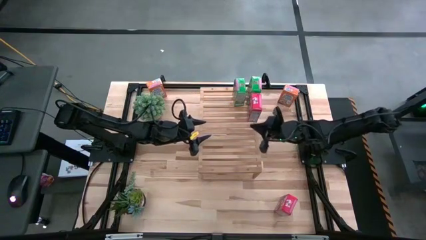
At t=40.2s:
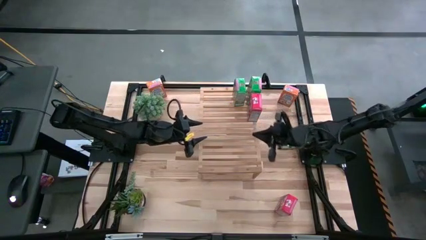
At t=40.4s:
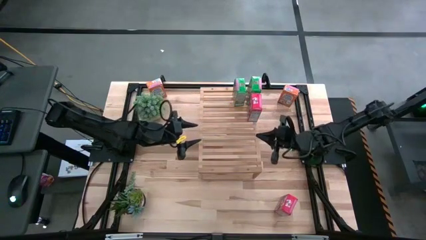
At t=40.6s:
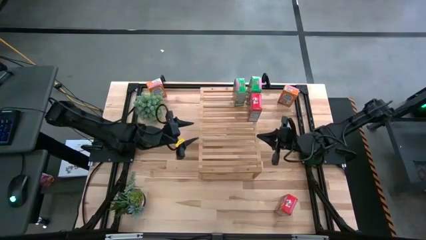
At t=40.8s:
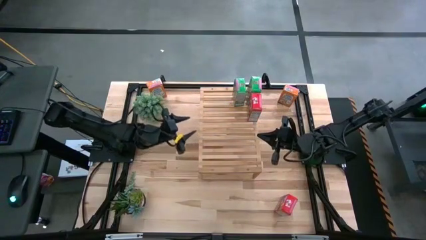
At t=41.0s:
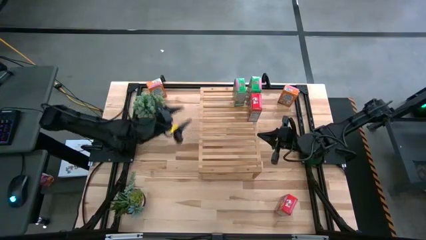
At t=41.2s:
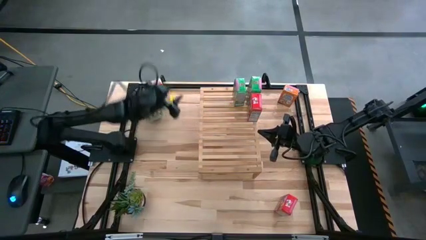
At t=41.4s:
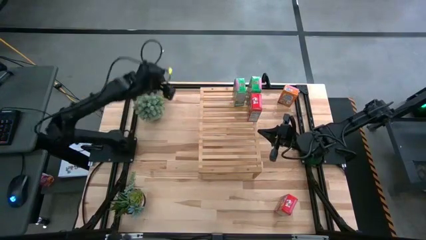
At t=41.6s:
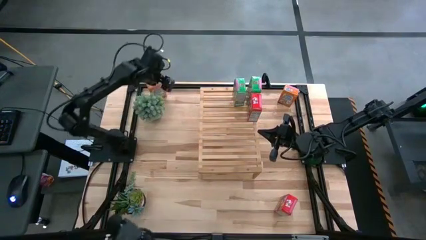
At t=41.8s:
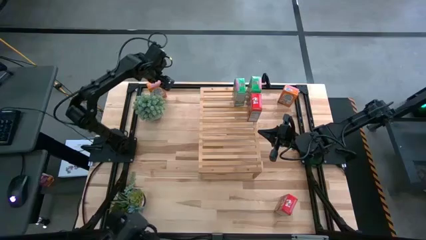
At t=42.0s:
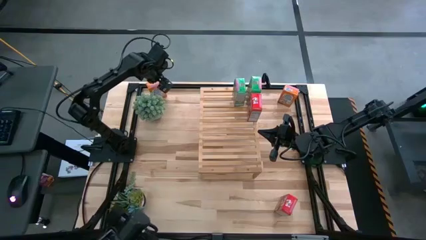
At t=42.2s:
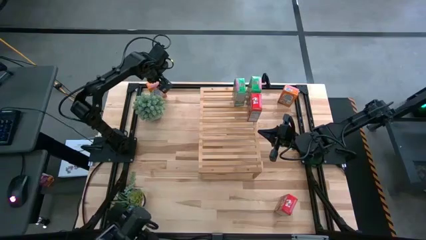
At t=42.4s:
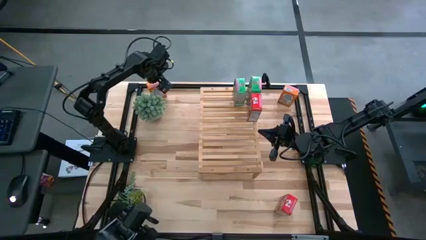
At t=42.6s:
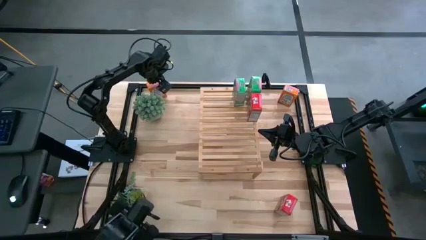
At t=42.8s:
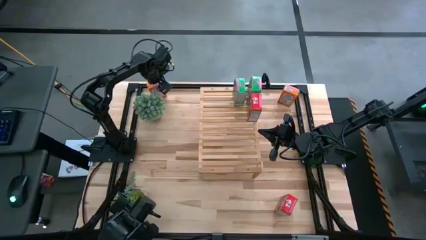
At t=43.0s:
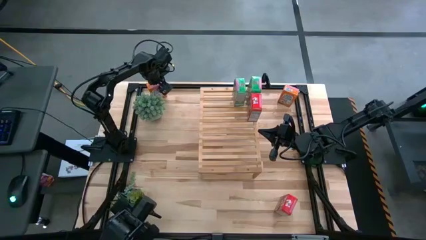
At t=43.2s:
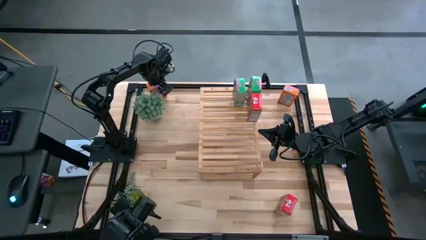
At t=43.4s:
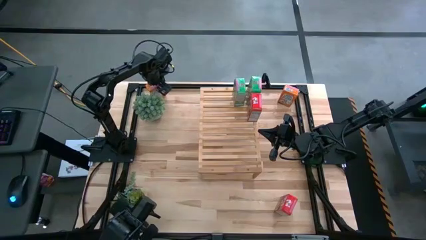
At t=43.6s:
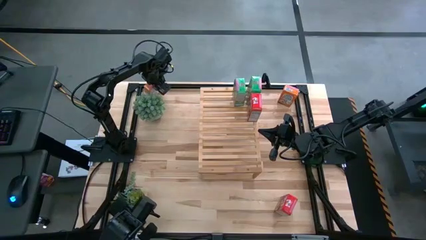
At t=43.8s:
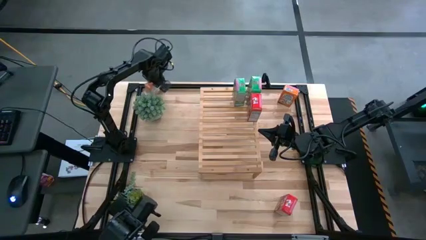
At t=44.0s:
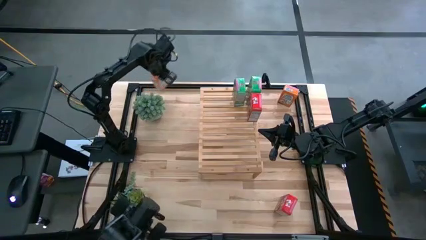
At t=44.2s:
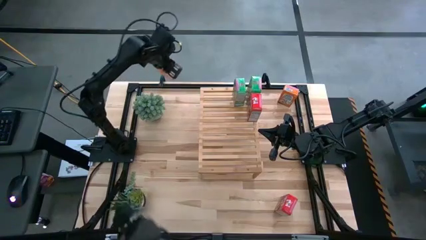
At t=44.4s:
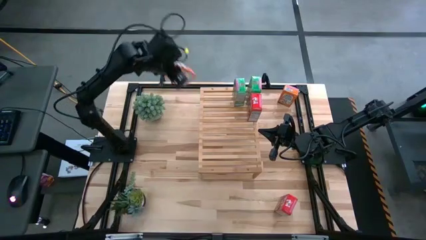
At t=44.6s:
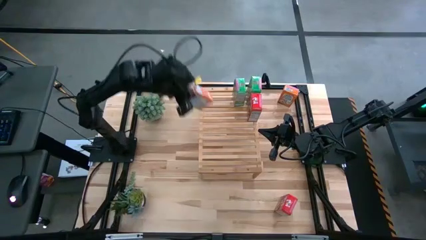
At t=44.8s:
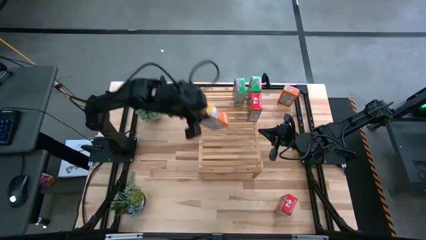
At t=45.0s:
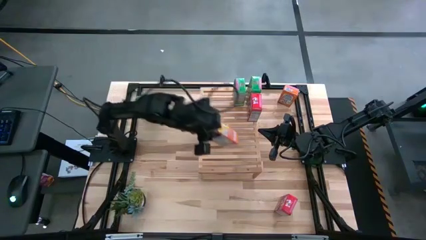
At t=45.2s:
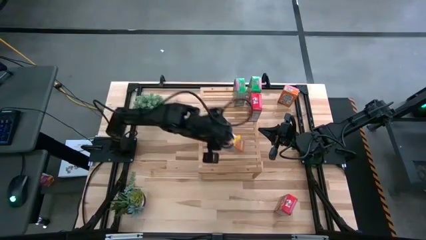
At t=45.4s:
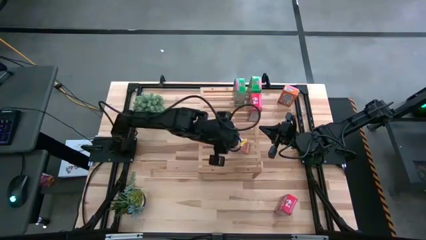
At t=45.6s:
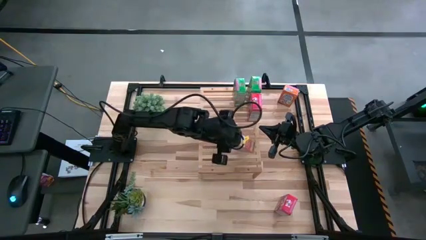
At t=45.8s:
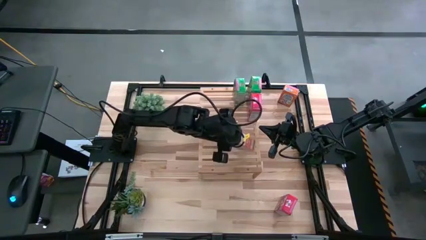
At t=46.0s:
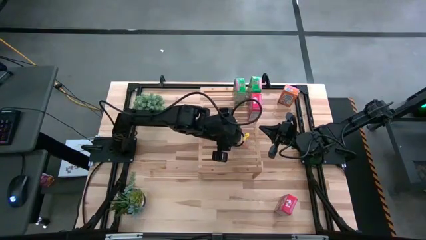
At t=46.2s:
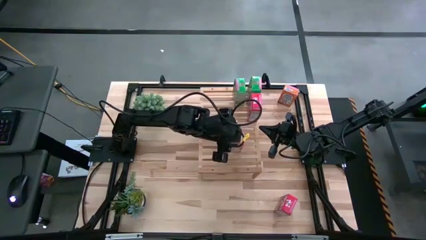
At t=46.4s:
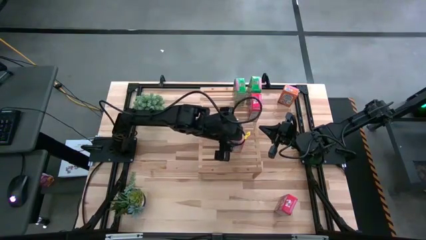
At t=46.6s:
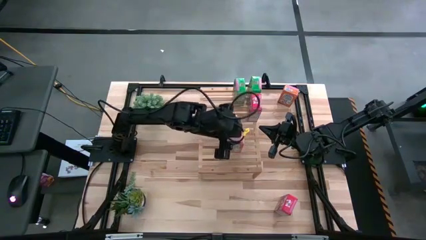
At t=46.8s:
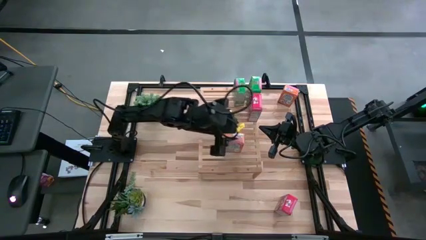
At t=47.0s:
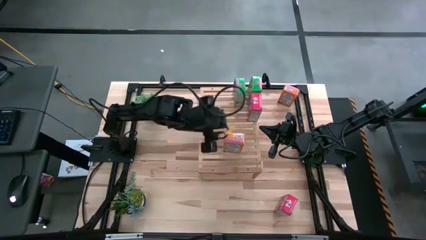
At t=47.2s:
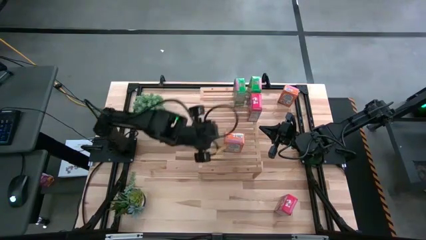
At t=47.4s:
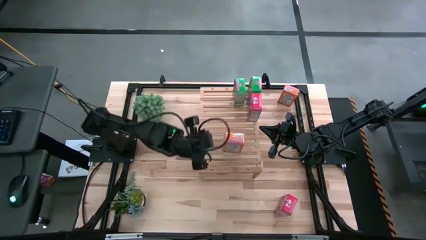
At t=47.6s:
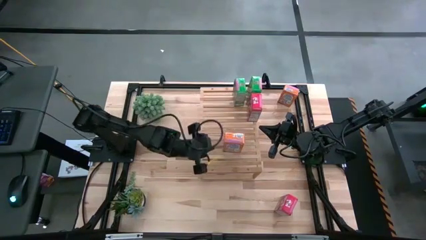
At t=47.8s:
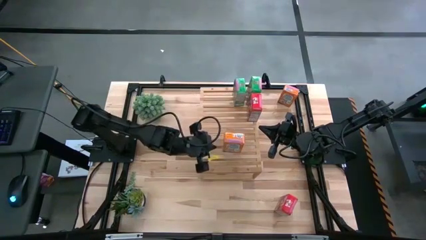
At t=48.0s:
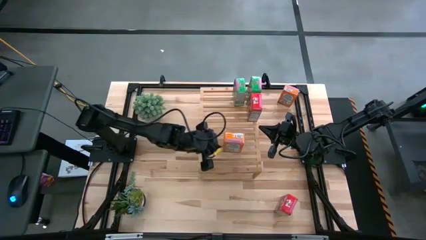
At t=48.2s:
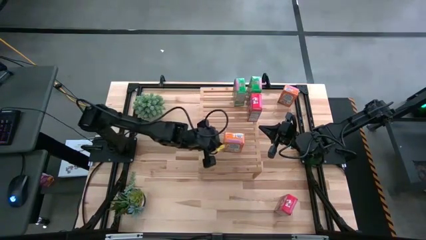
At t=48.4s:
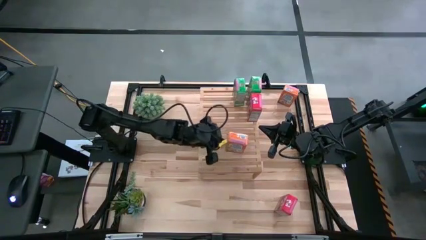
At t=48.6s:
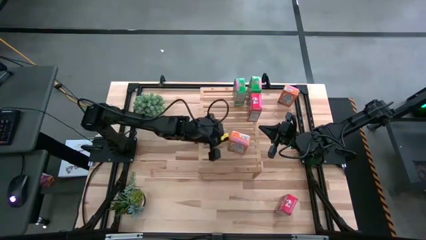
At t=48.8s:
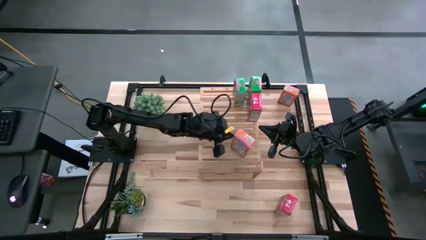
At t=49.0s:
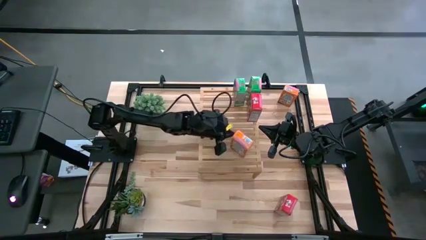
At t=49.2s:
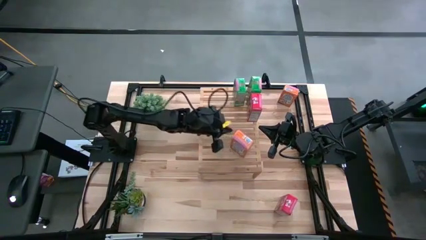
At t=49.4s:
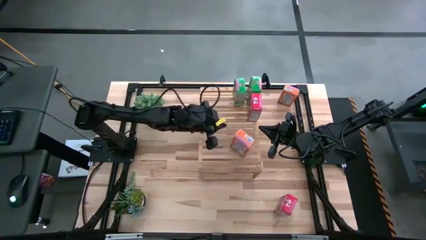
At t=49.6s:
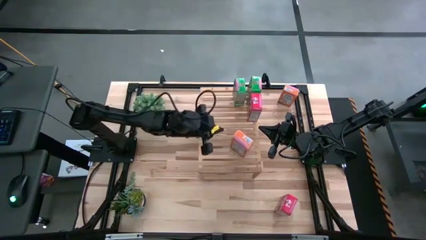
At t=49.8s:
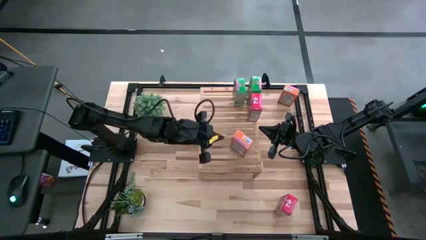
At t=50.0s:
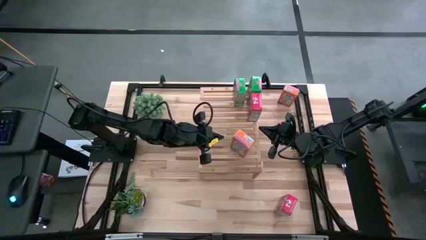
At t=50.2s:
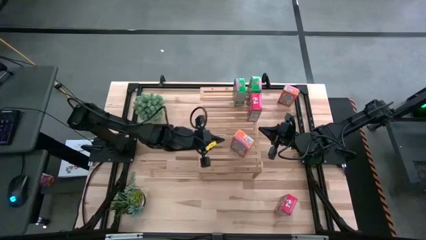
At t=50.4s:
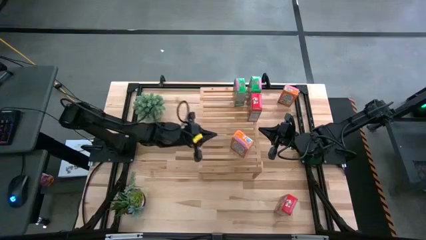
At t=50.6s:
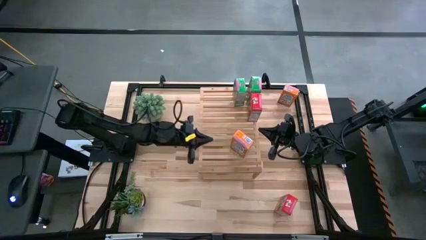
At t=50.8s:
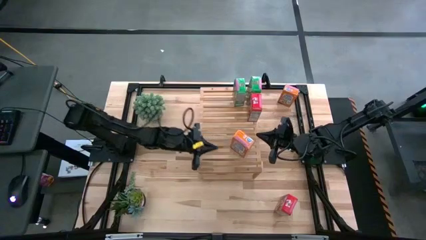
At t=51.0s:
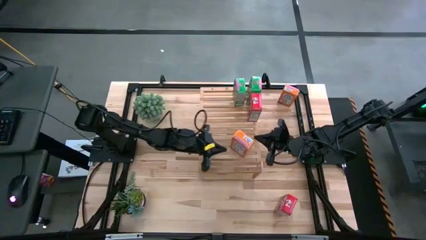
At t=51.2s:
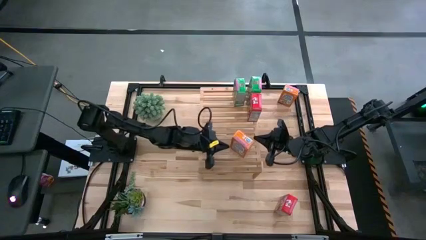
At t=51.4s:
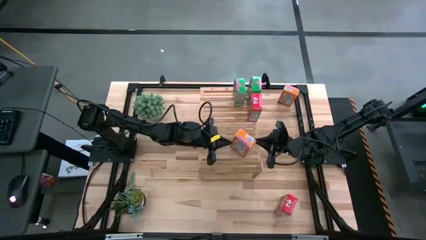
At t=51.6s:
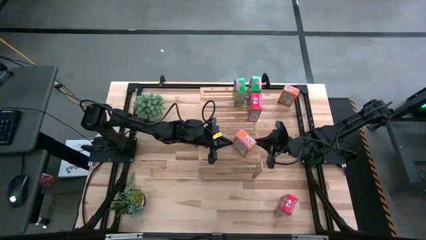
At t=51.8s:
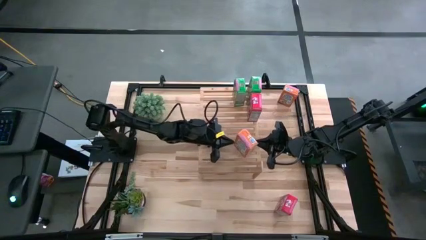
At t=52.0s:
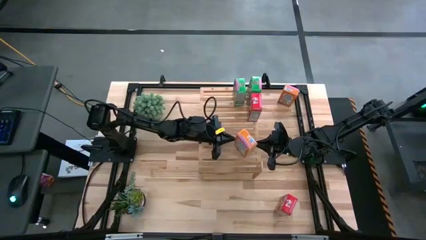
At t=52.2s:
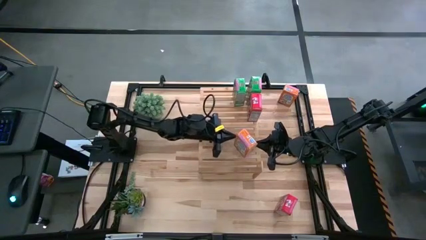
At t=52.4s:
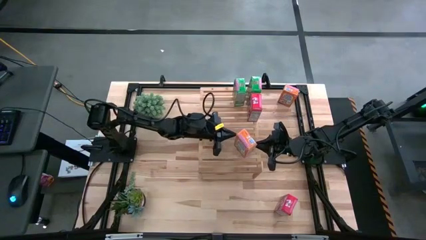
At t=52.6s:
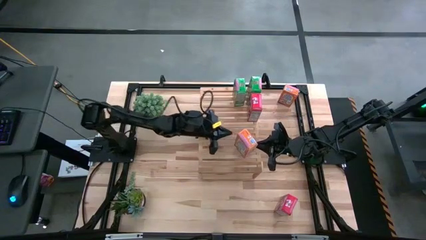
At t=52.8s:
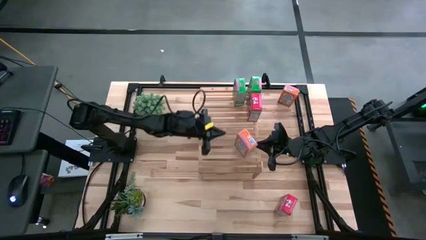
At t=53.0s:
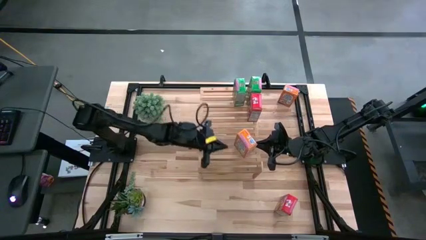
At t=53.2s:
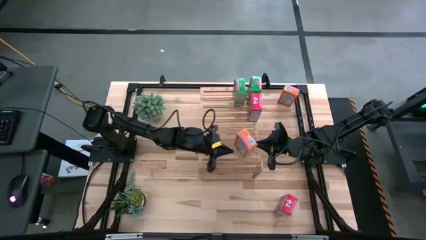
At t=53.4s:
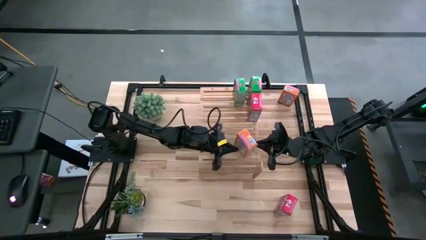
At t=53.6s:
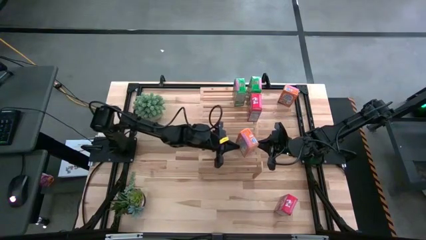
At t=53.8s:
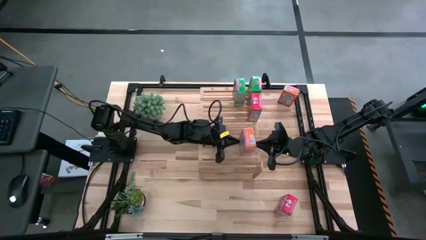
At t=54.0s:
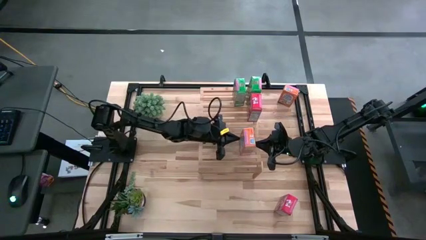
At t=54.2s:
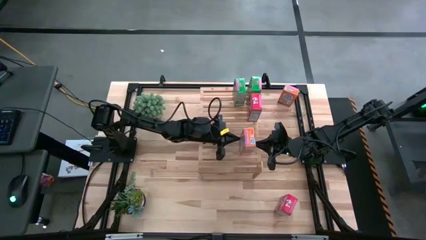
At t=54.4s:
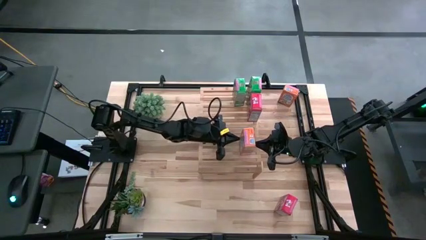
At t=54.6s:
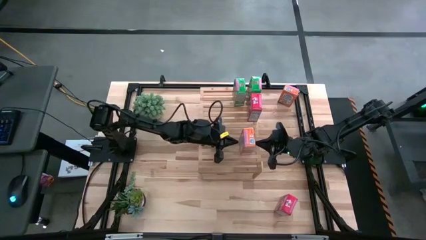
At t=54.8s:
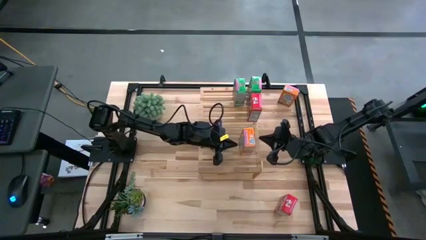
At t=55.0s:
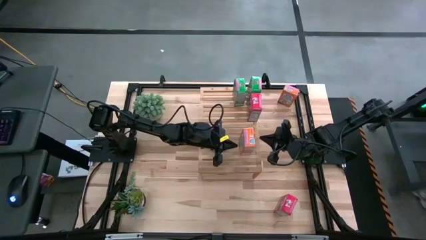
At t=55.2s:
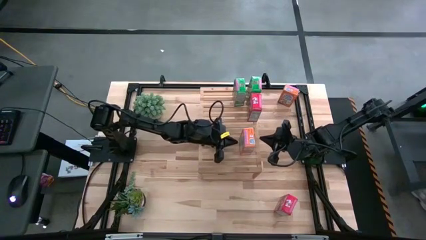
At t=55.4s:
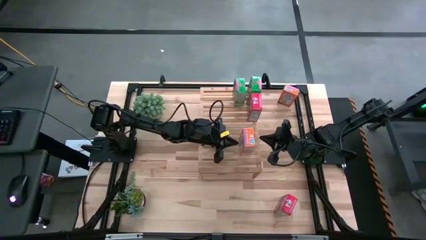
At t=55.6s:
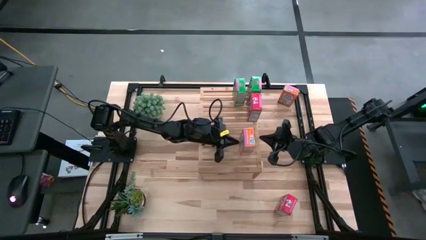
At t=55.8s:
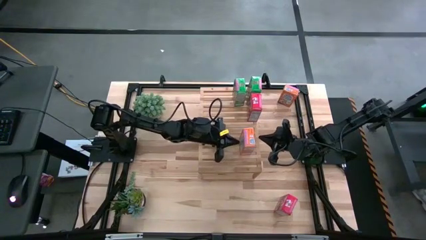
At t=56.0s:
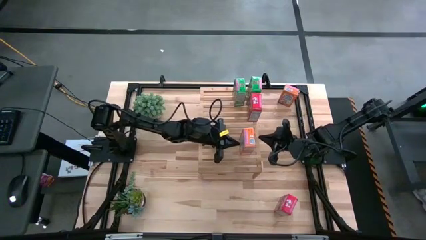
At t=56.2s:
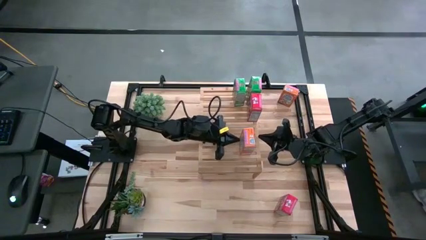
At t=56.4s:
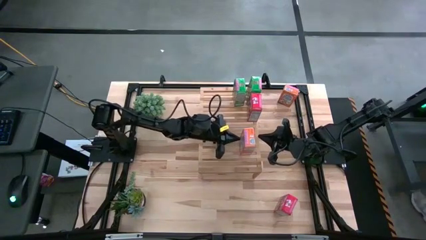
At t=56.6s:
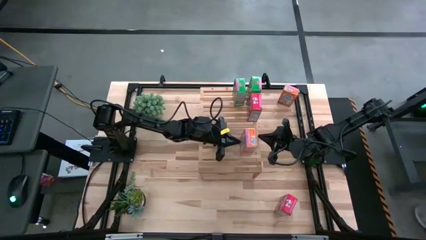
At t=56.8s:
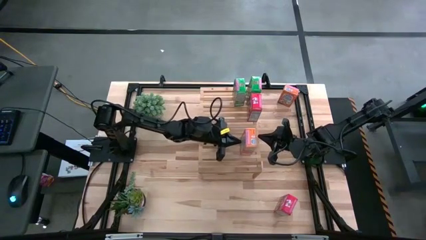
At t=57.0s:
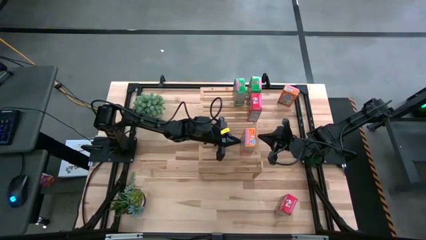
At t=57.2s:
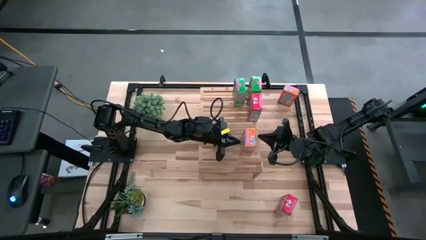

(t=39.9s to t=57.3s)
Task: Stack cereal on shelf
Put the left orange cereal box on the shelf
